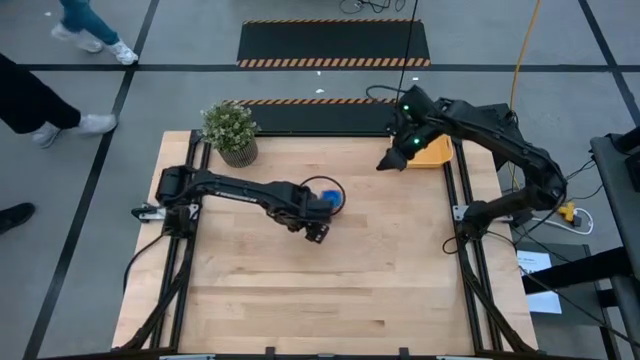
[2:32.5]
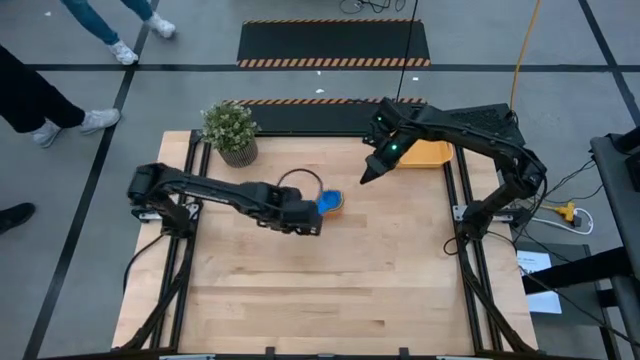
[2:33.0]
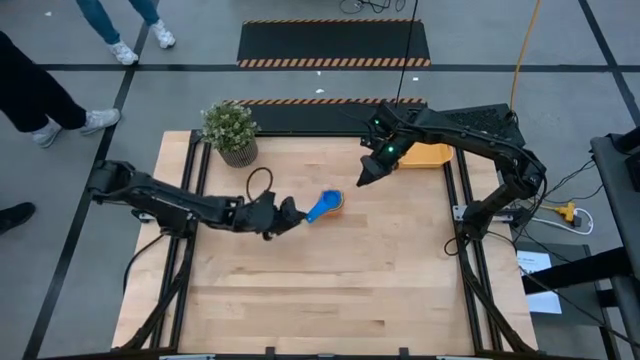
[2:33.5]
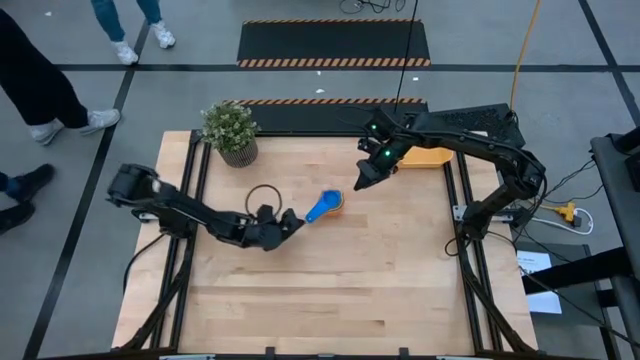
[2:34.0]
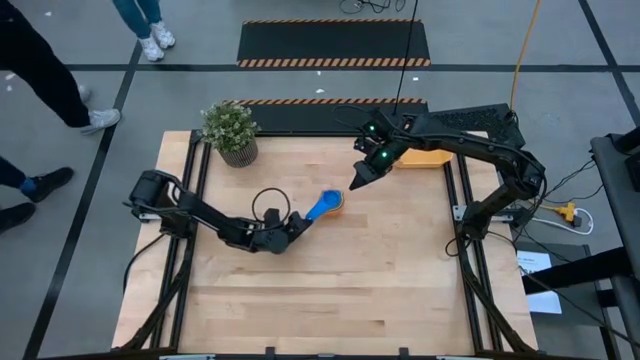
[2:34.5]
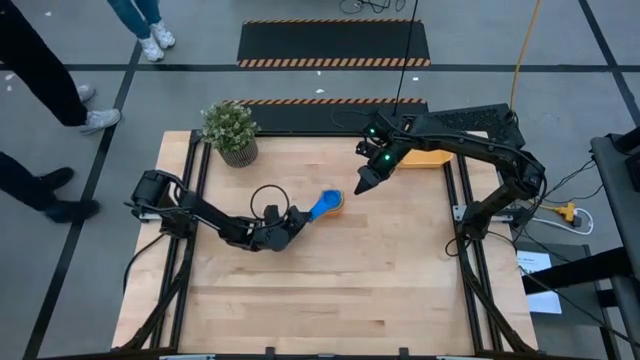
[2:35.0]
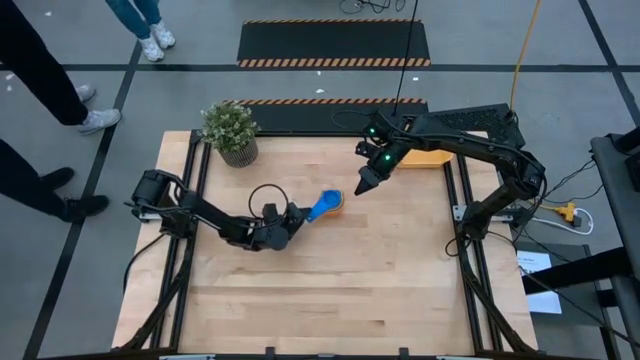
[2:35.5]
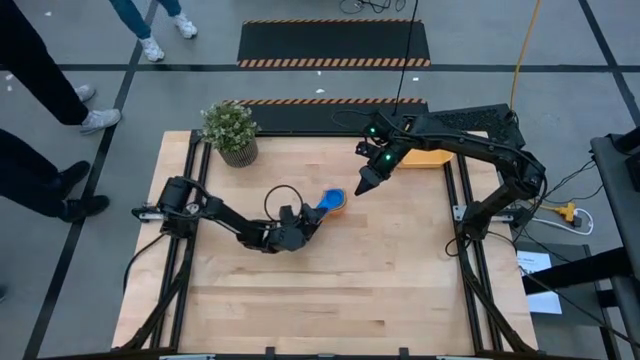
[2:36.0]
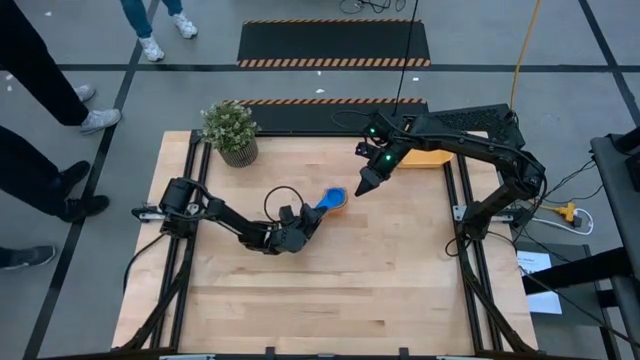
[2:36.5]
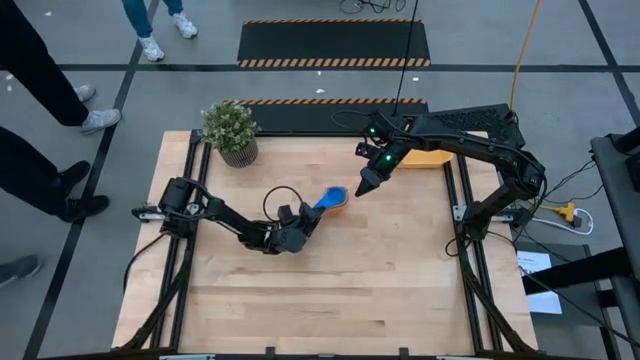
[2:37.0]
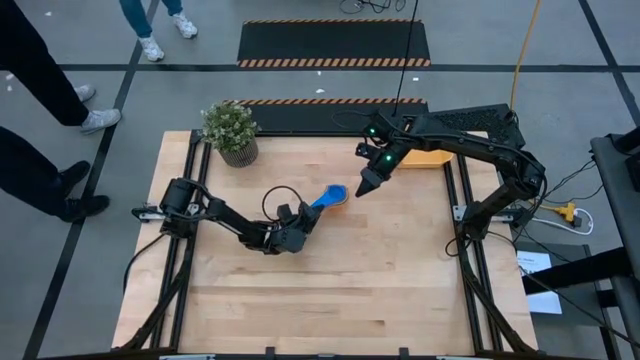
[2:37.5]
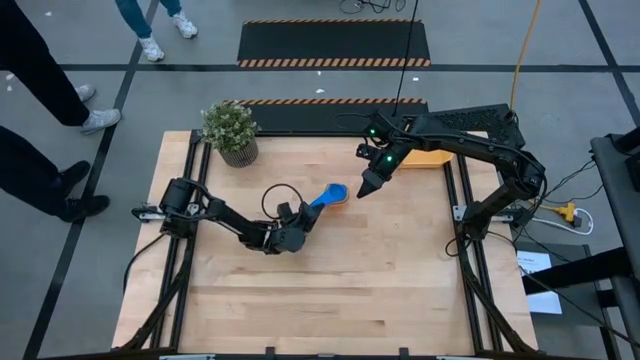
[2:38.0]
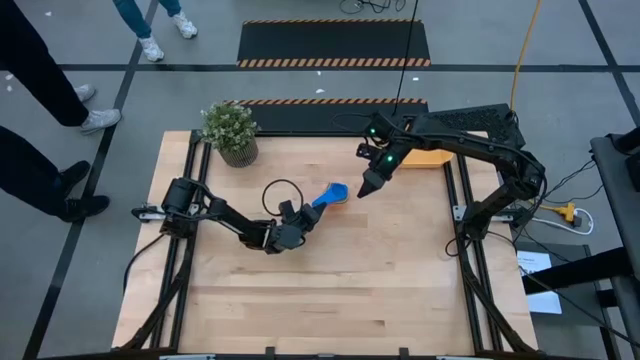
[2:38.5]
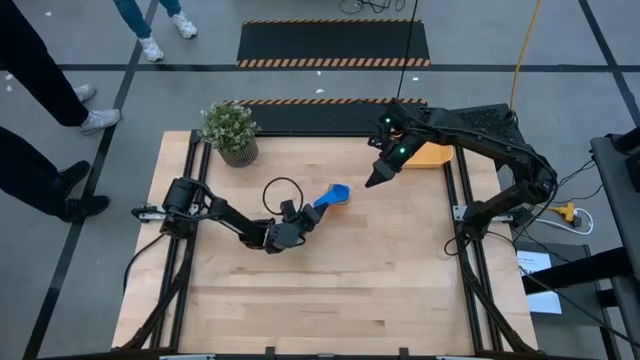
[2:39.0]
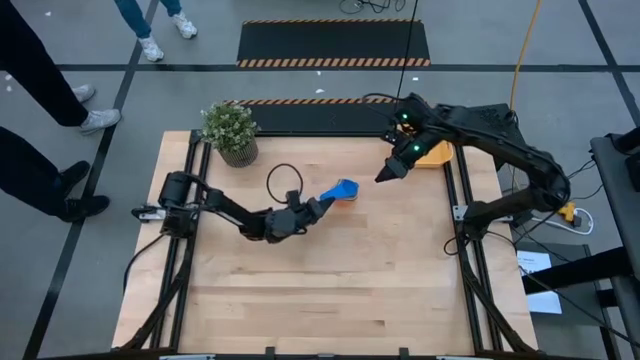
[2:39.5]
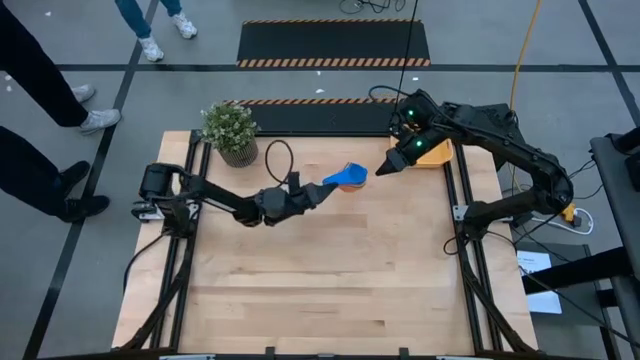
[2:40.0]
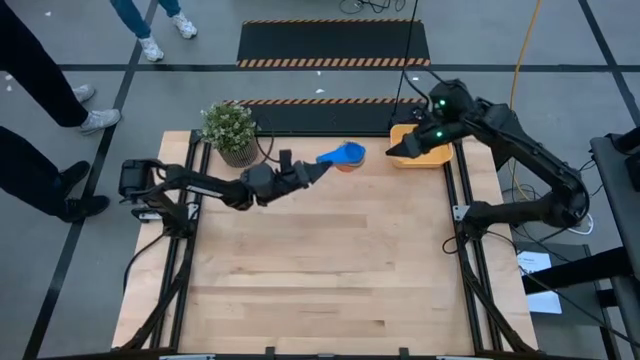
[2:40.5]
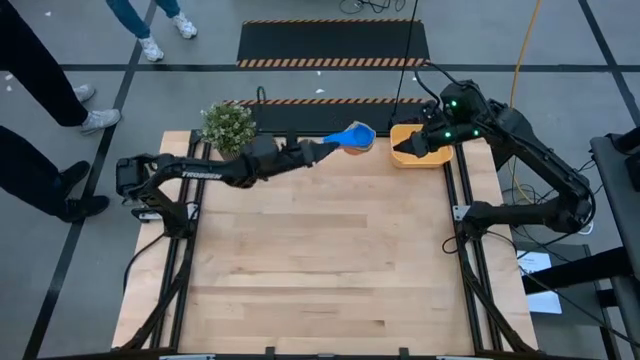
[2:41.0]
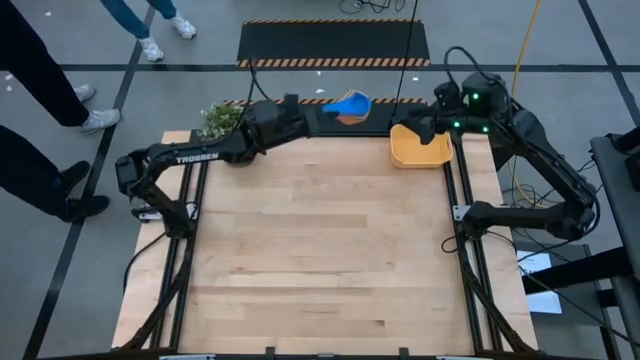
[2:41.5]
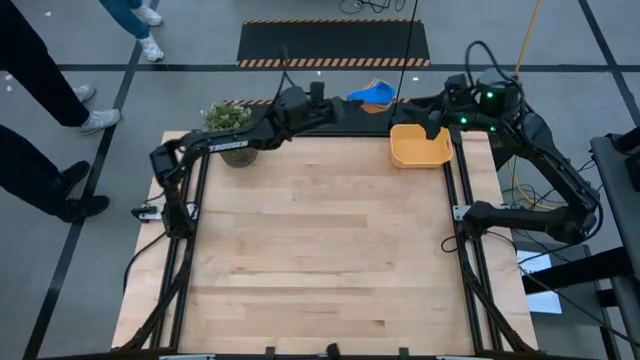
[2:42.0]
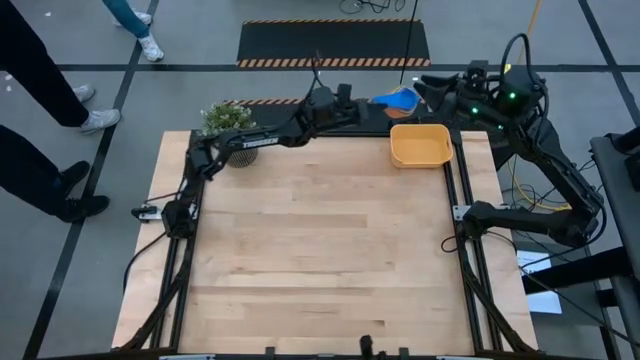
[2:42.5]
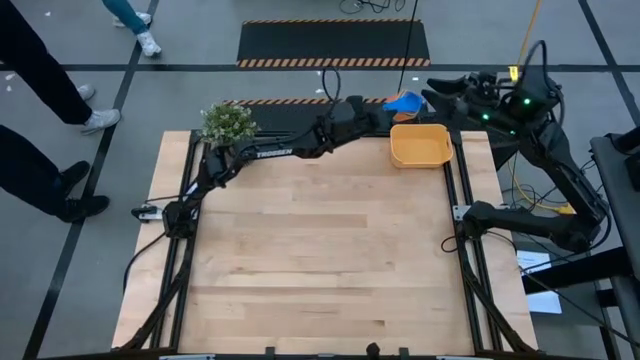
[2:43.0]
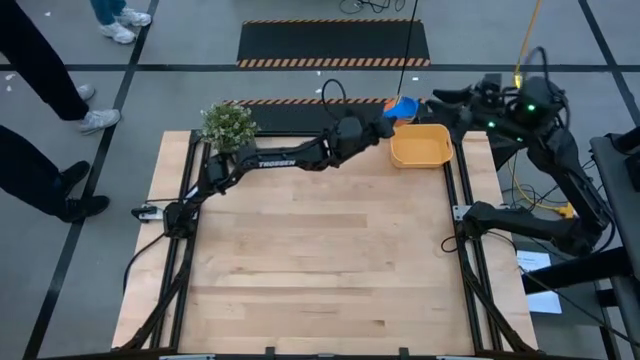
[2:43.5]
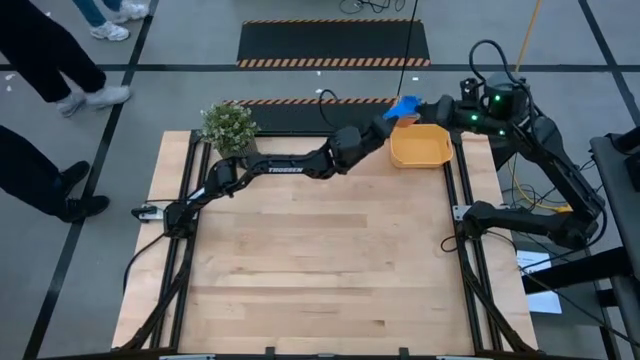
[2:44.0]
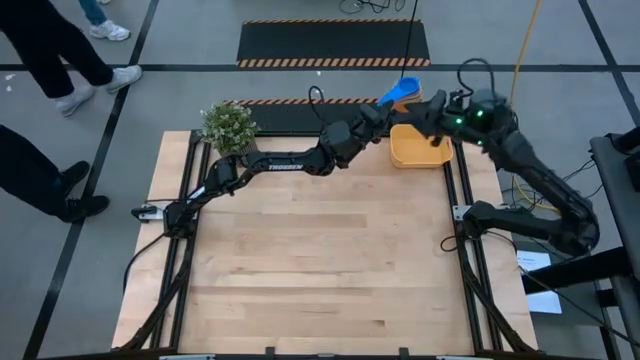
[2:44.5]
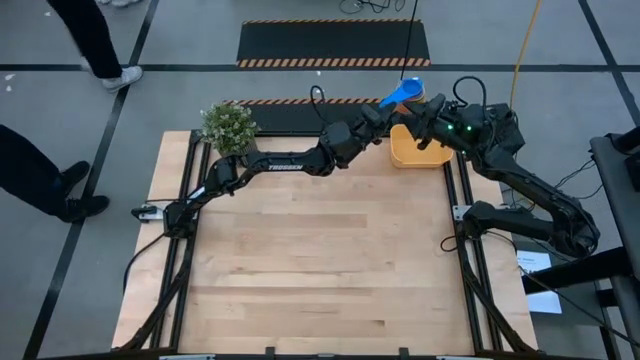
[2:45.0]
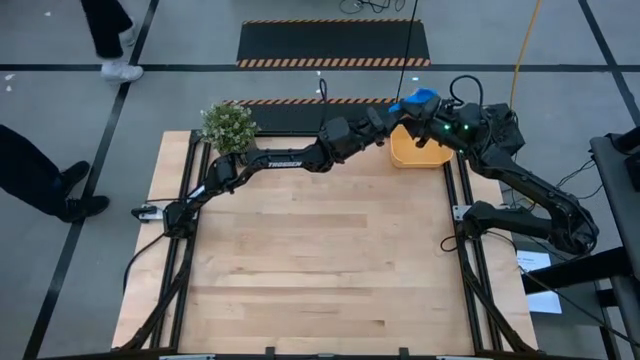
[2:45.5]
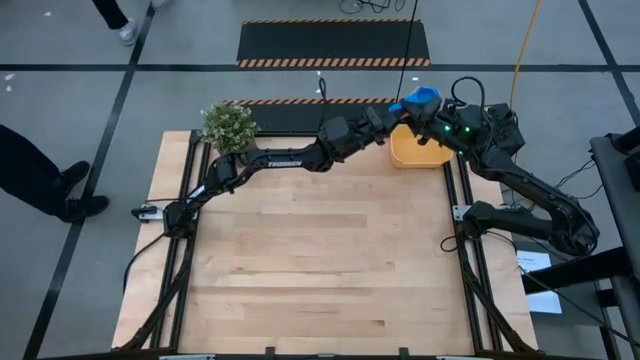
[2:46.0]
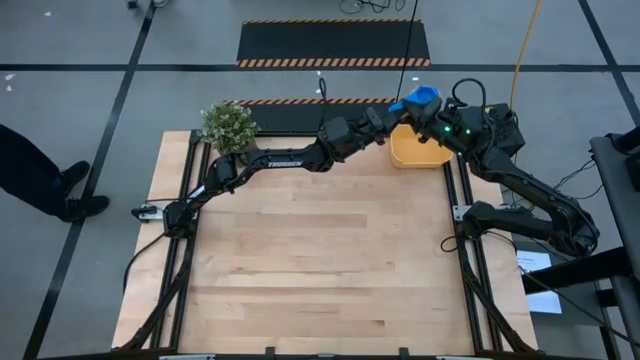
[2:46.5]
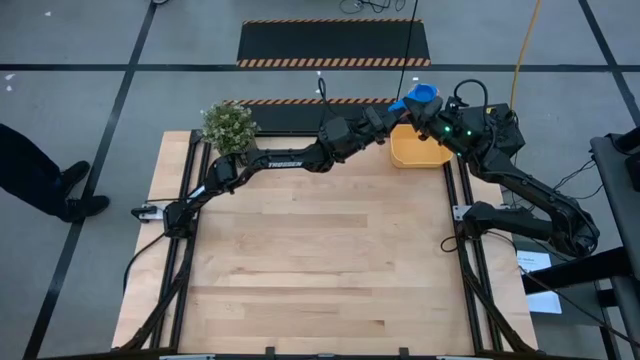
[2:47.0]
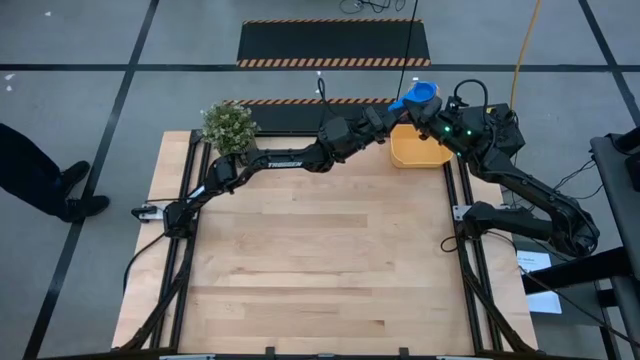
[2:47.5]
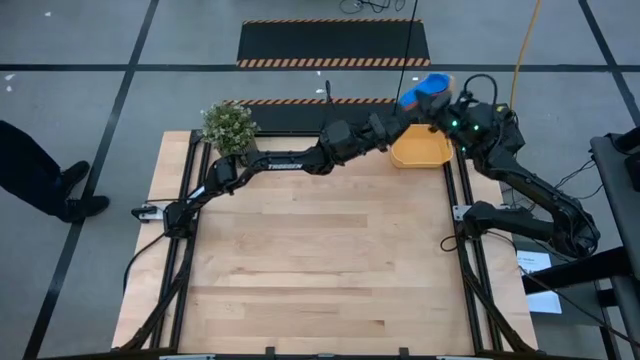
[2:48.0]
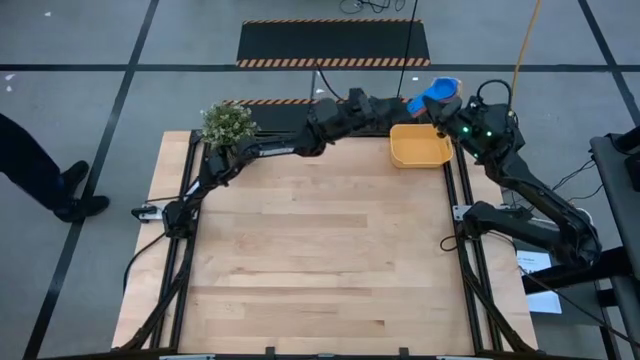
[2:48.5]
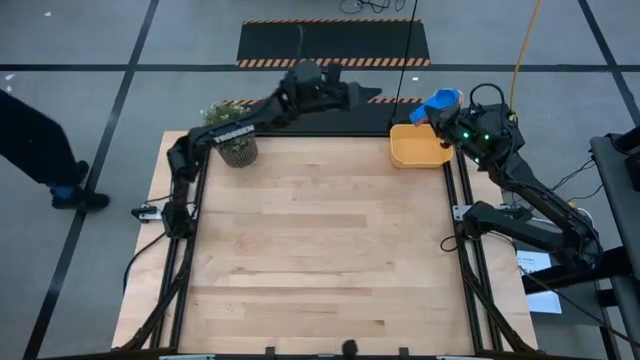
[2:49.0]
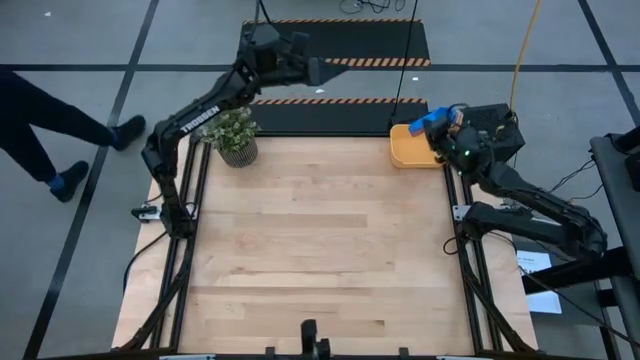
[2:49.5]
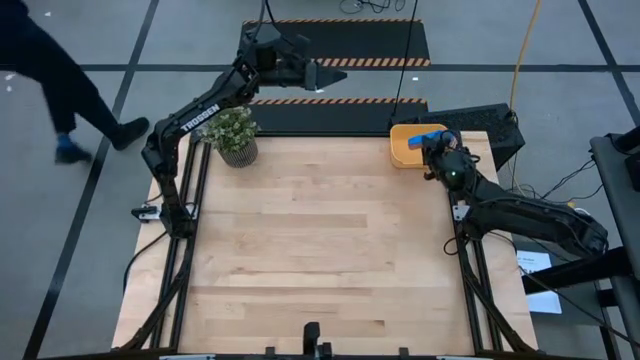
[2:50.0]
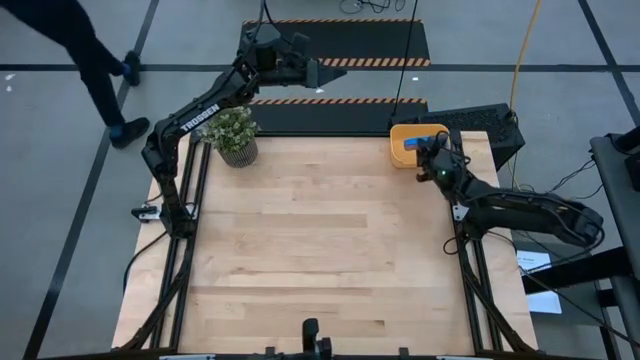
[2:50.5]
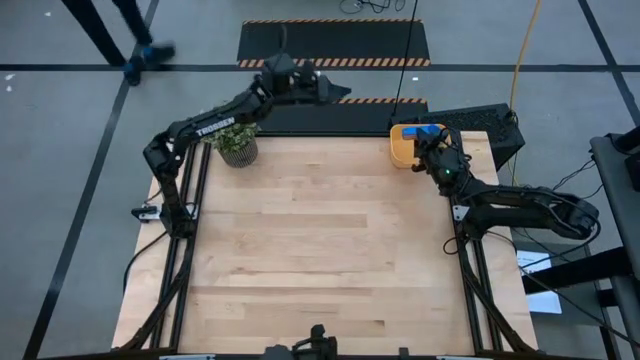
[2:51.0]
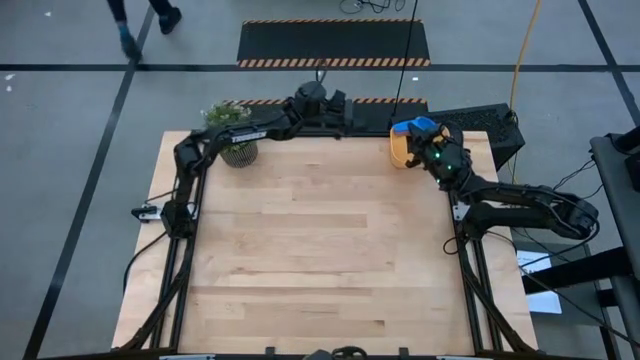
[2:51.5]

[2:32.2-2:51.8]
Task: Nest measuring cups in basket
Put the nested measuring cups into the yellow bin

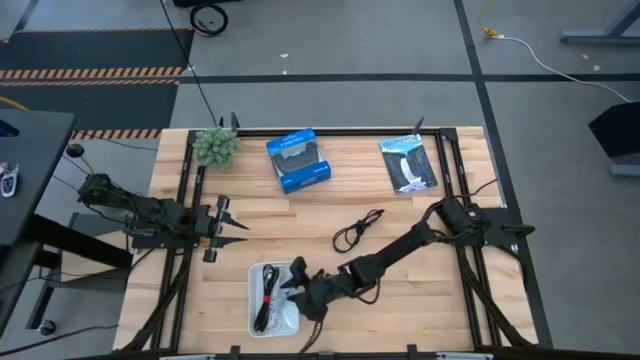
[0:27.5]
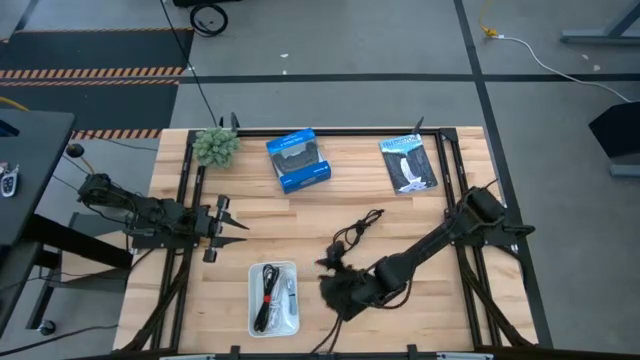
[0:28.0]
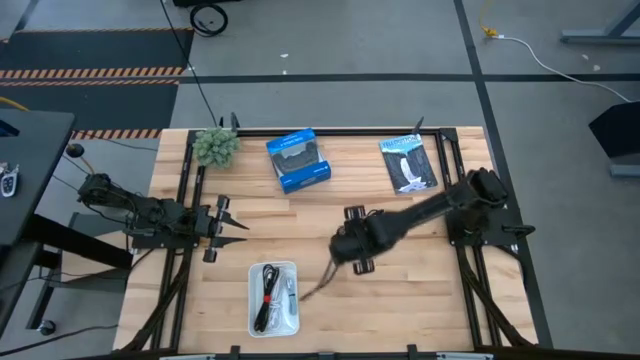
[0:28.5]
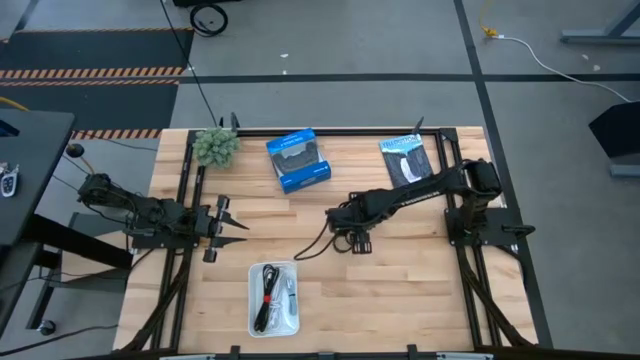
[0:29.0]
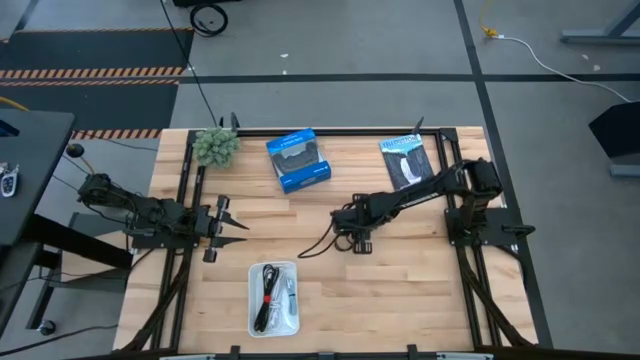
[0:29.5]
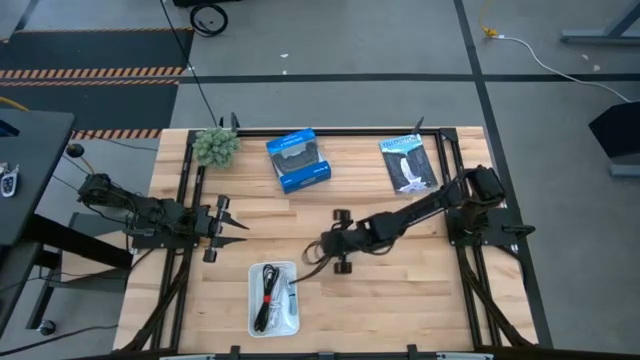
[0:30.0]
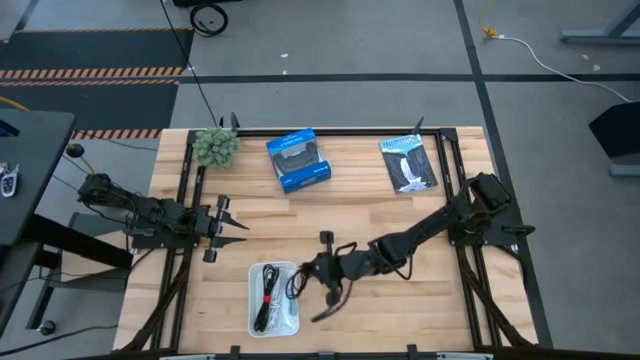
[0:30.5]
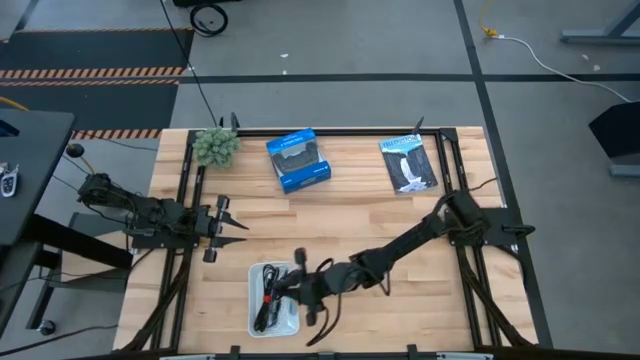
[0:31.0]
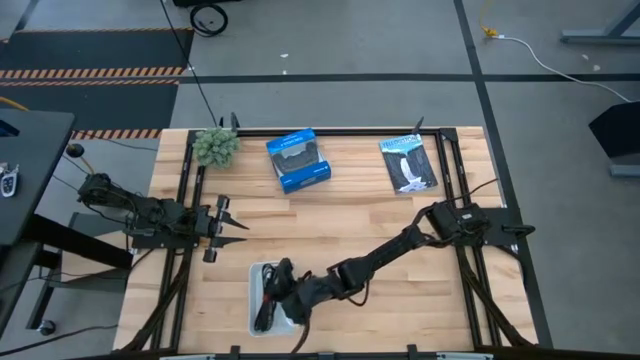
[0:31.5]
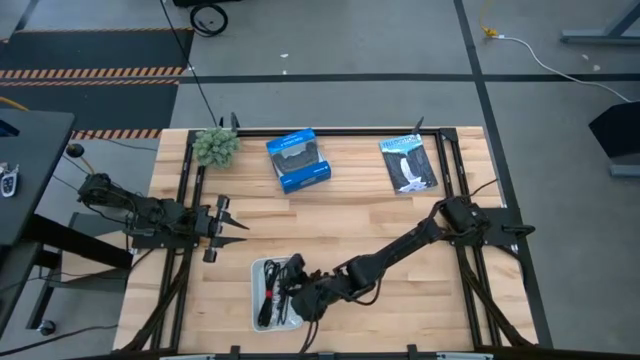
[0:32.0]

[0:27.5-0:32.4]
Task: Pick and place USB-C Cables
Put the black charger cable into the white bin
